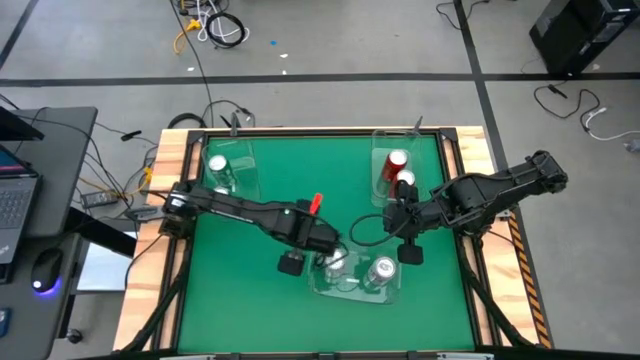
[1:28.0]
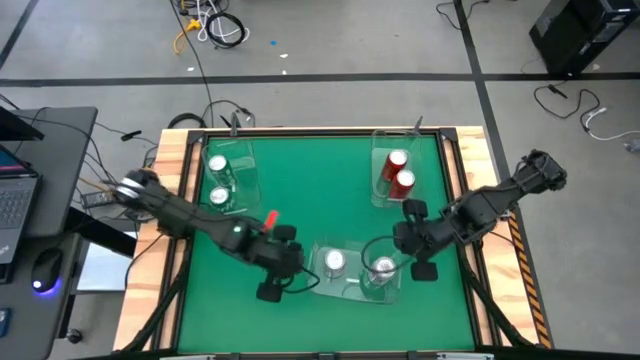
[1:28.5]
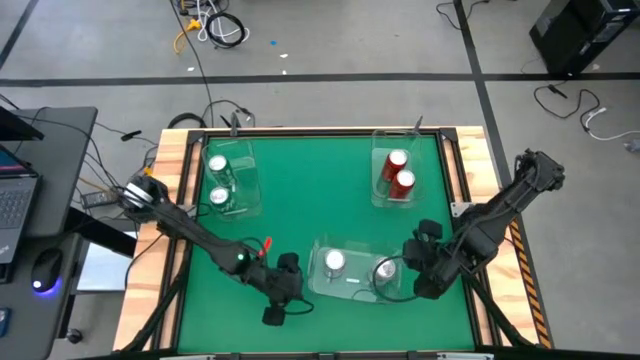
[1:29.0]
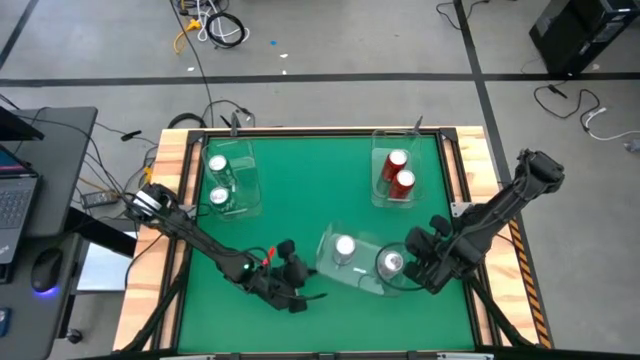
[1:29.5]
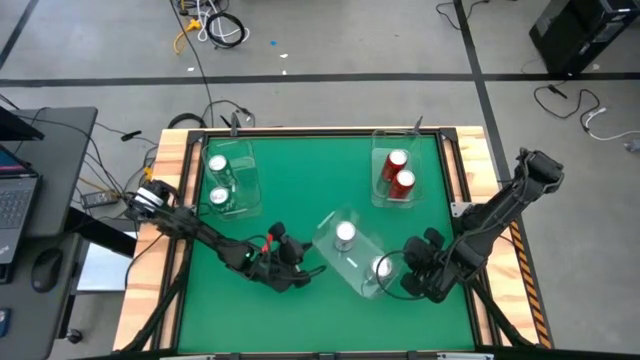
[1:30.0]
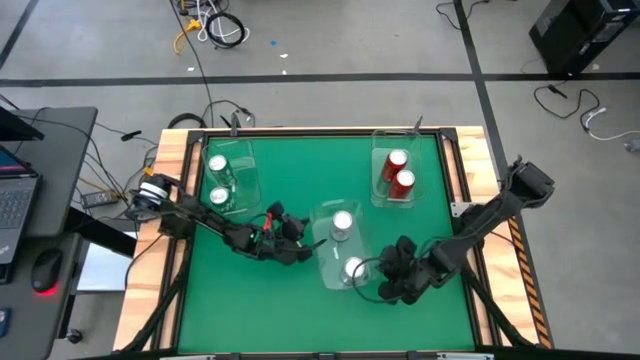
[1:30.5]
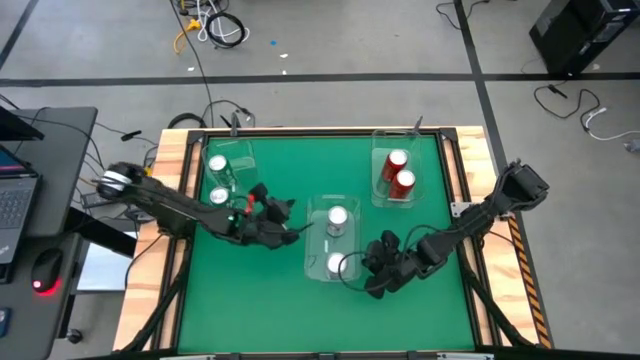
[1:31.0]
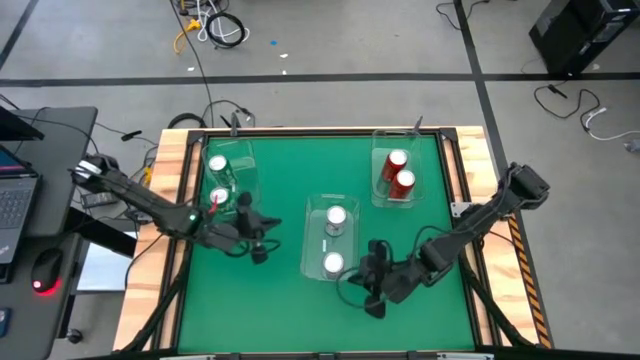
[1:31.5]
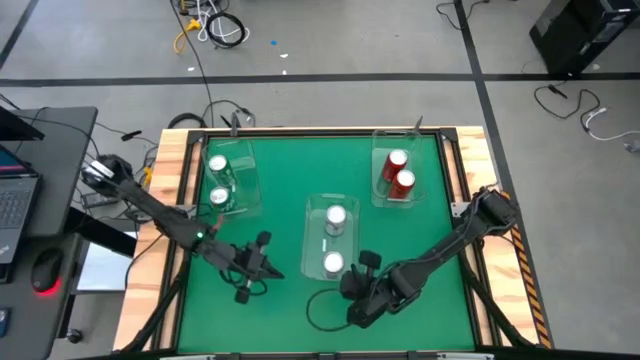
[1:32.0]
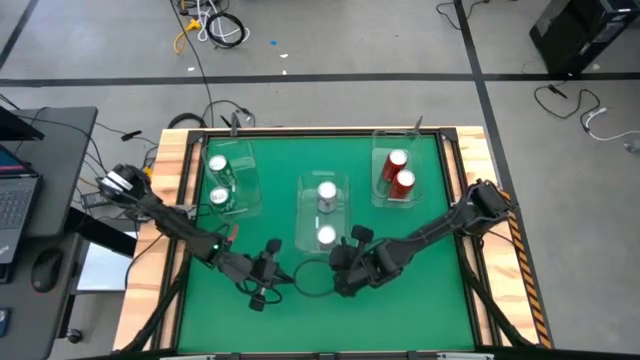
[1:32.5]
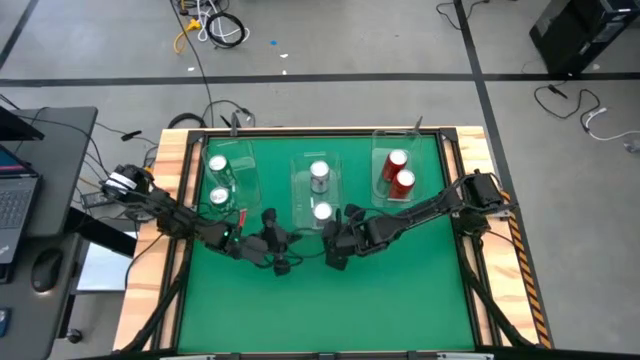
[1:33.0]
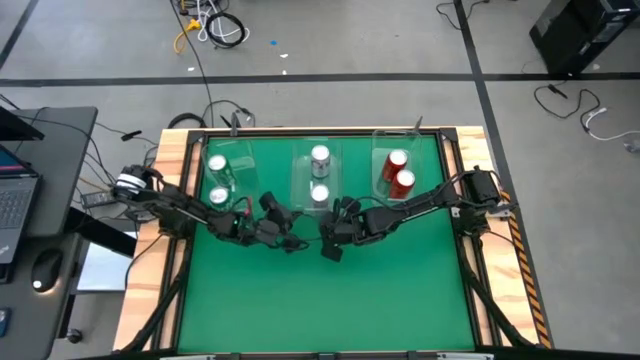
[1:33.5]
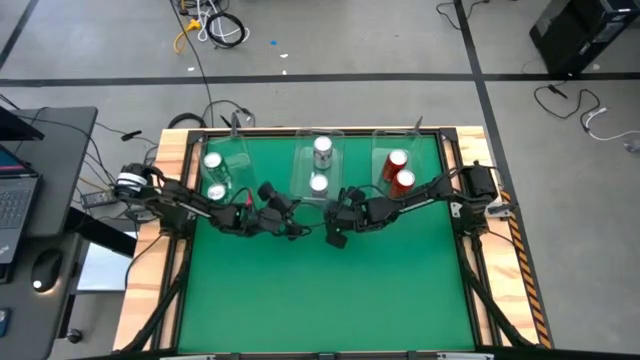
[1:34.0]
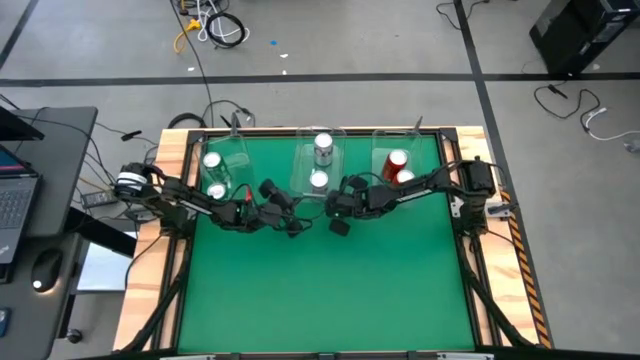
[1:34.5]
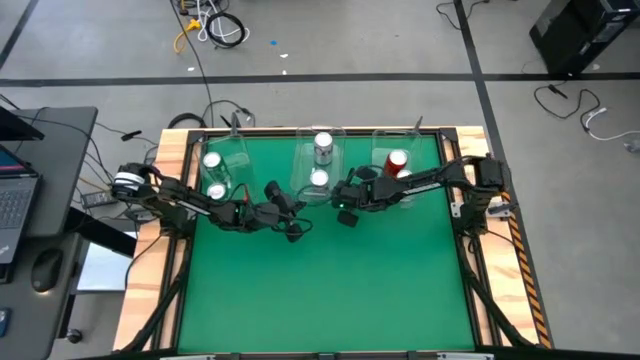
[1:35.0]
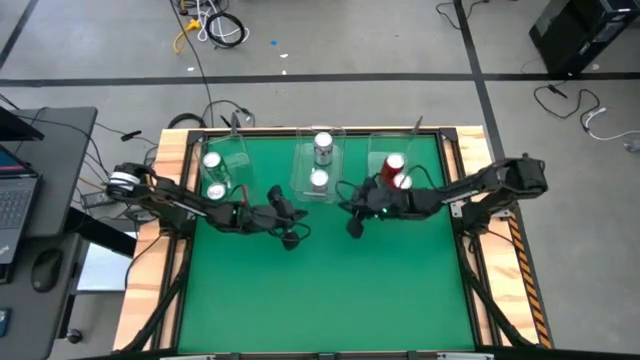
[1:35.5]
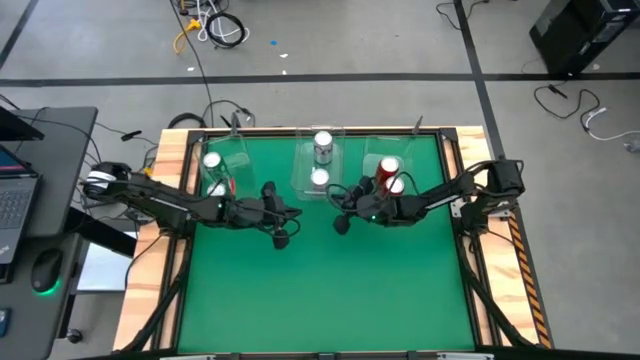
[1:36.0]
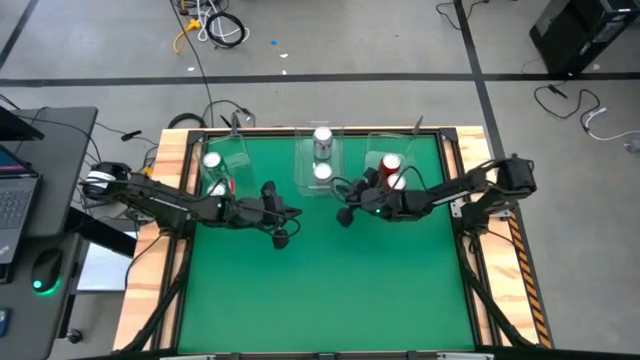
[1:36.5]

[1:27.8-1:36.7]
Task: Sort soda cans
Move the bottom transparent bin to the top middle of the table

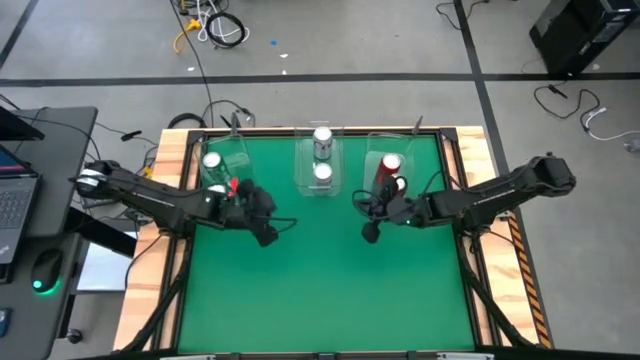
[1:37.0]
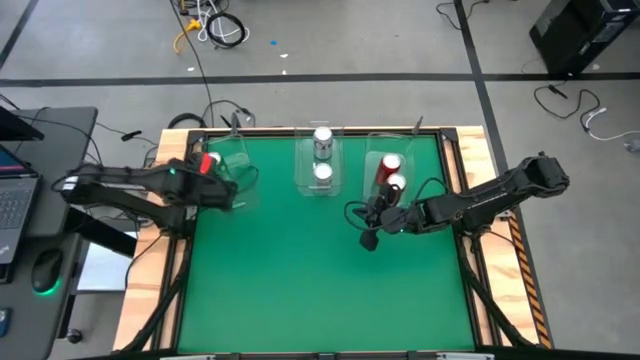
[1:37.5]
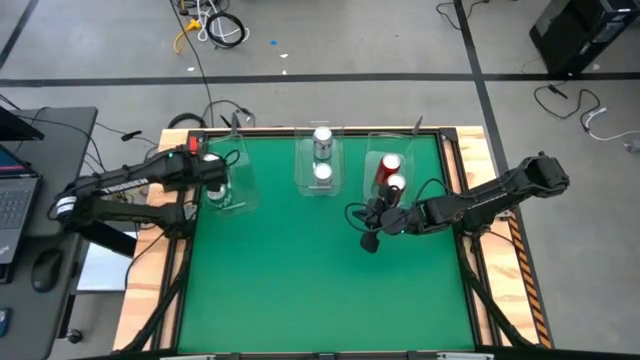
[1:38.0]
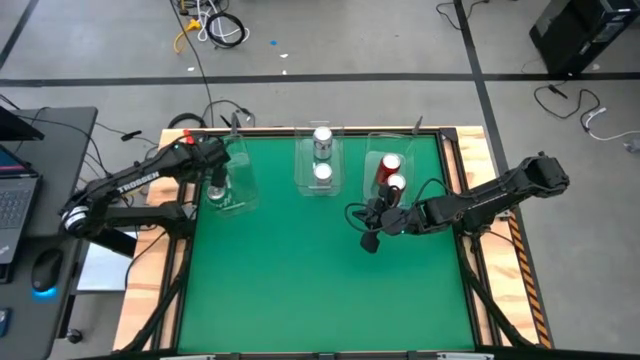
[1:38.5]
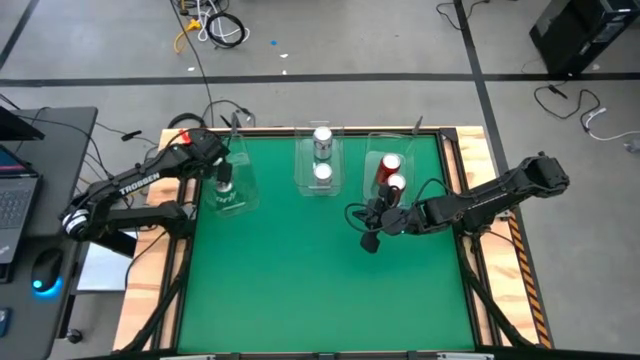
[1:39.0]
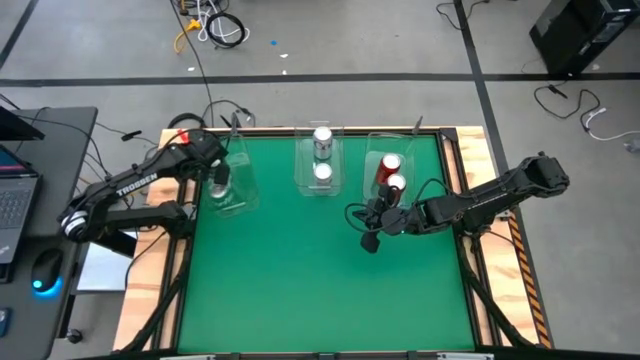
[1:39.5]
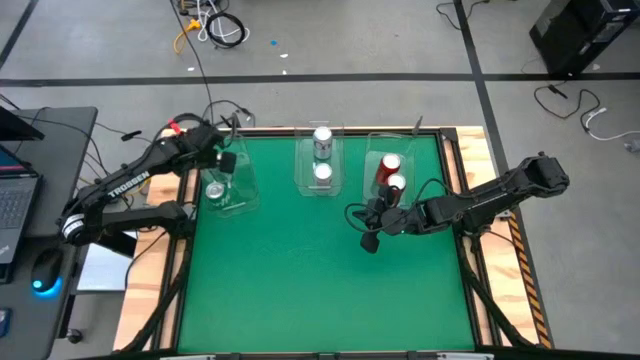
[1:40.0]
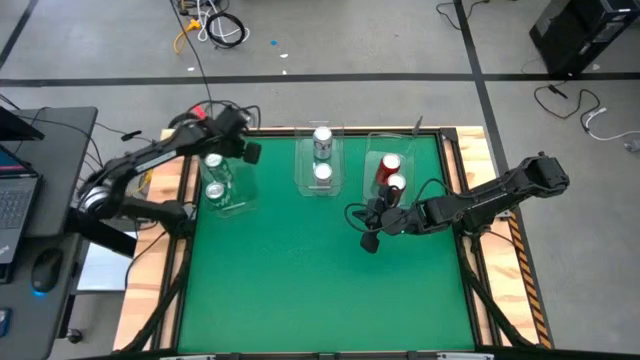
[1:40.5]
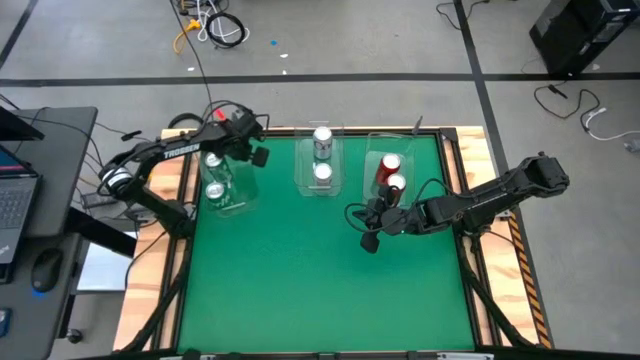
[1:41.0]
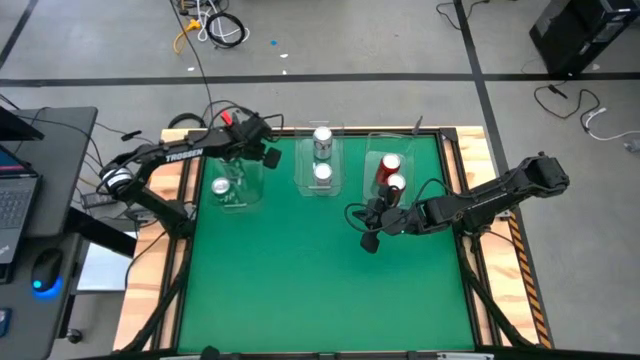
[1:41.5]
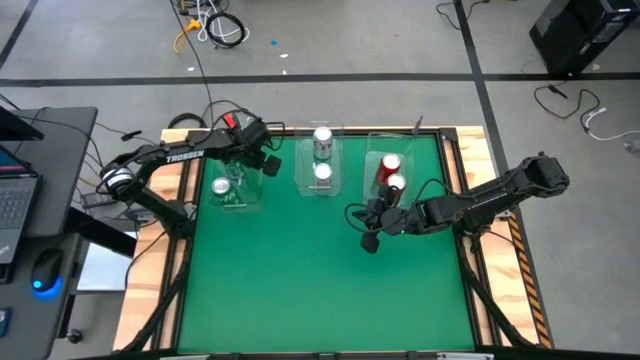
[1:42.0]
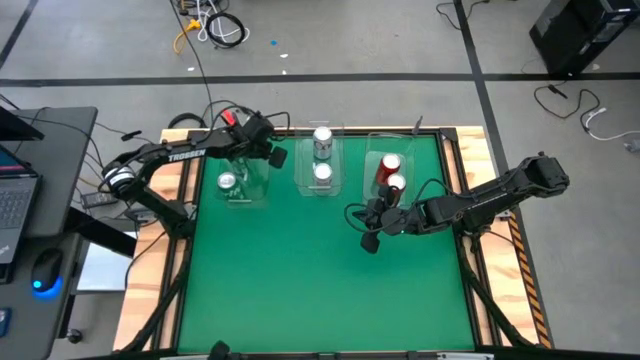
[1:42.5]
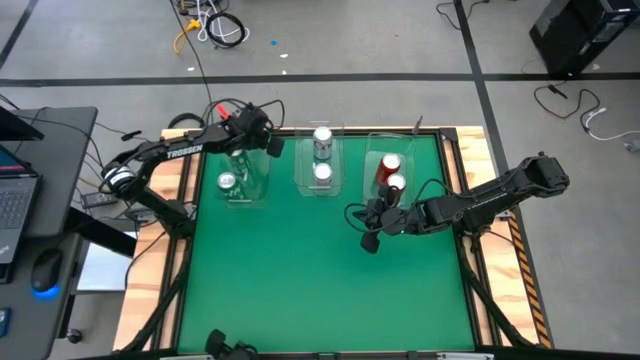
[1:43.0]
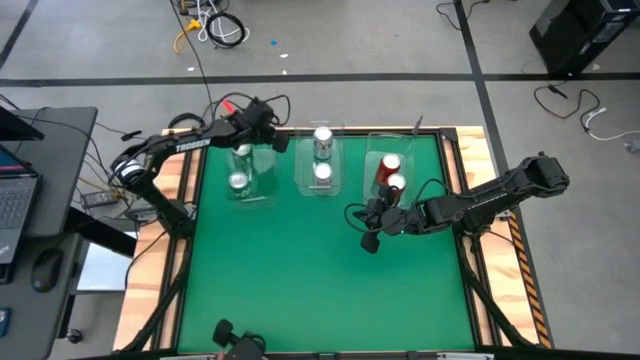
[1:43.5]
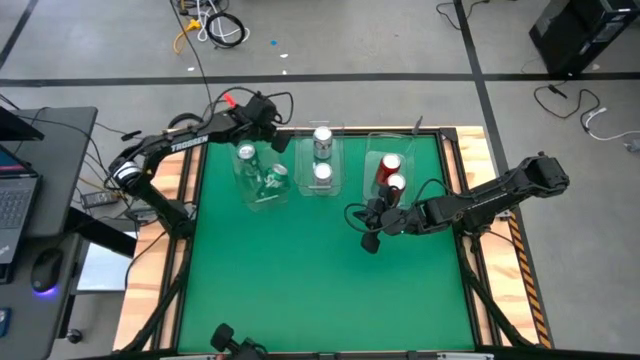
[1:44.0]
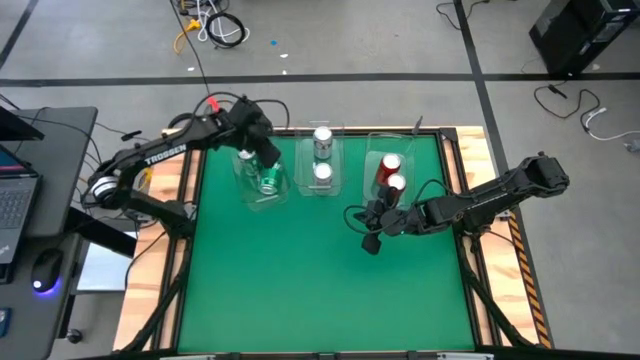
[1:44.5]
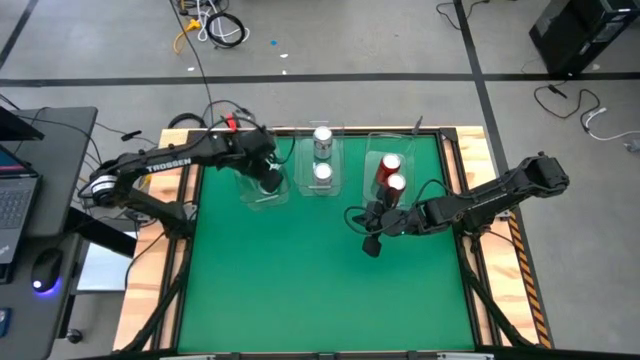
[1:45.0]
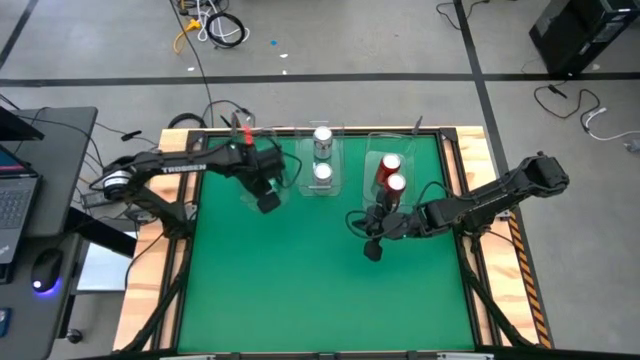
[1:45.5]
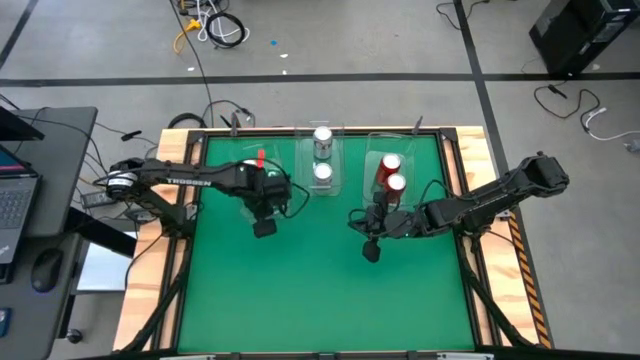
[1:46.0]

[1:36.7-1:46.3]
Adjust the left transparent bin

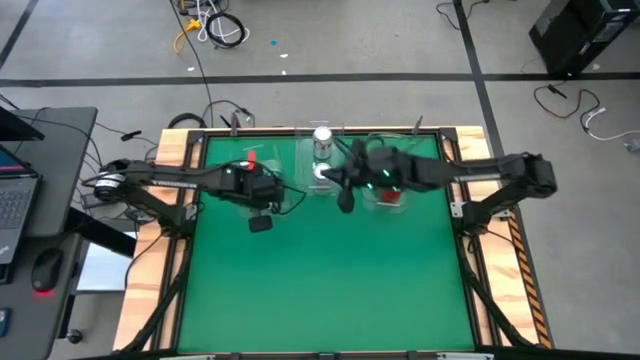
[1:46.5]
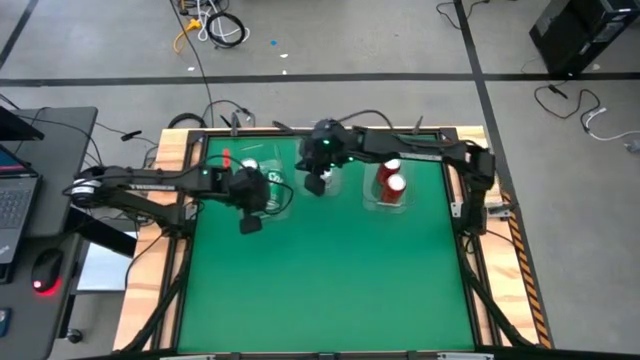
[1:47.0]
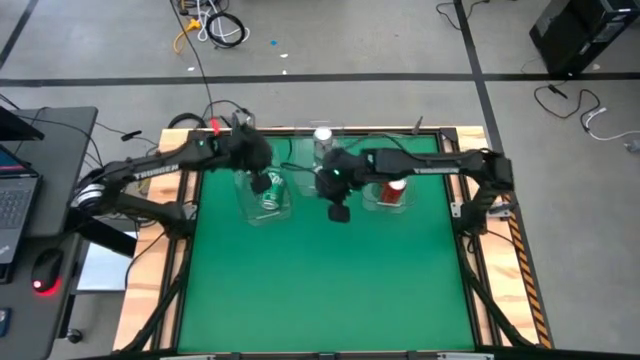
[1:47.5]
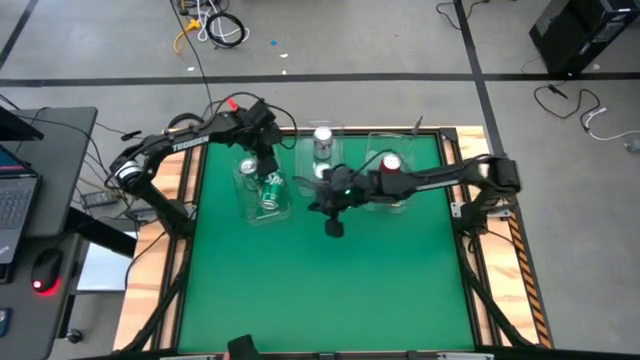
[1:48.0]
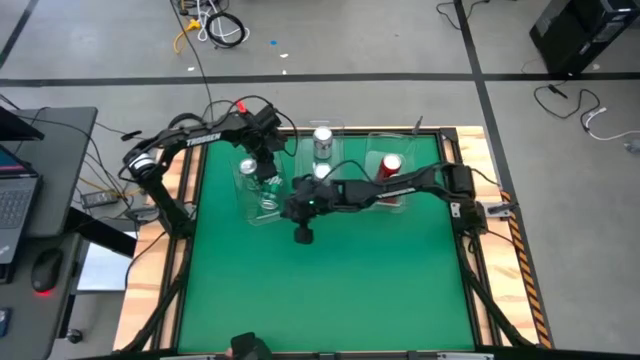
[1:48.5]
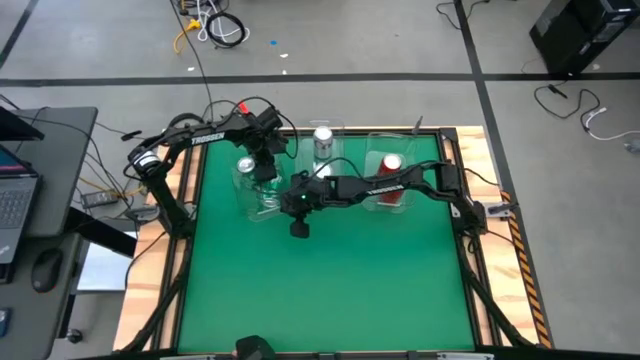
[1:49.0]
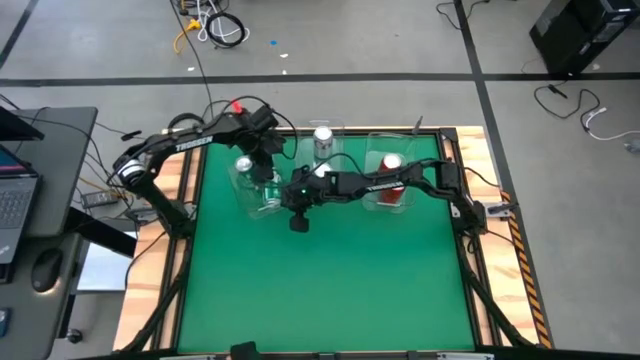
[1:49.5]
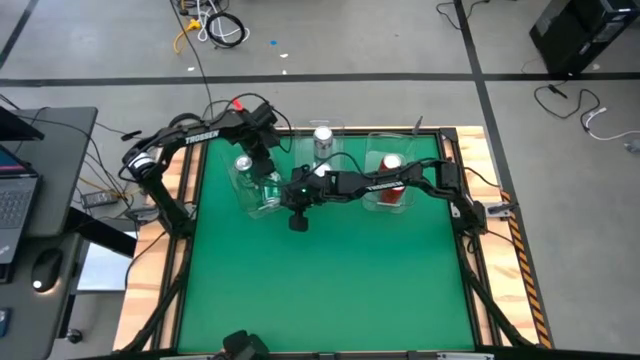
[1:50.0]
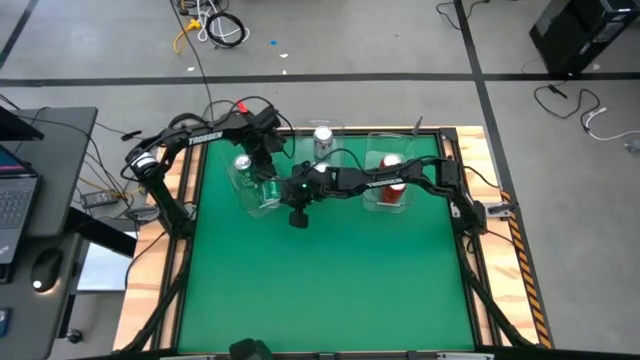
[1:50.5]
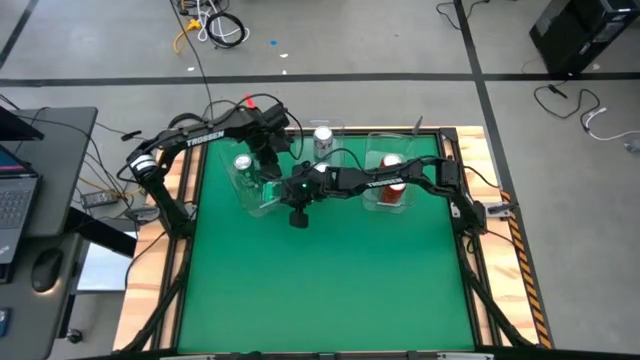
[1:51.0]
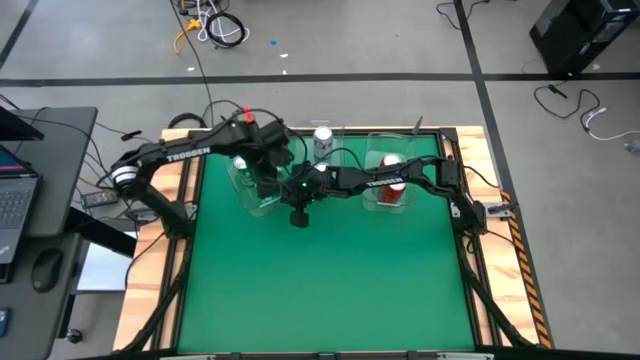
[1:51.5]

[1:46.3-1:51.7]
Adjust the right green soda can on the left transparent bin
